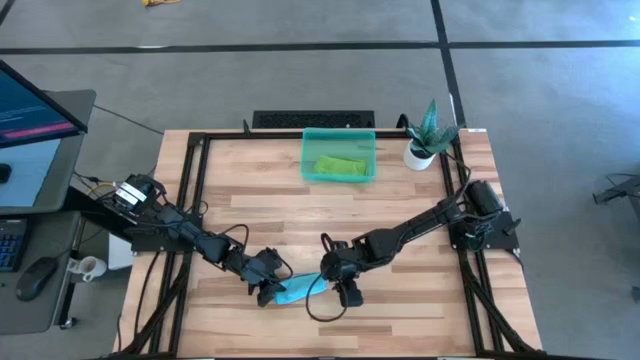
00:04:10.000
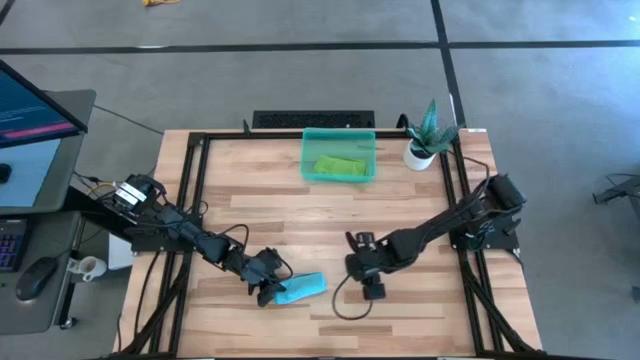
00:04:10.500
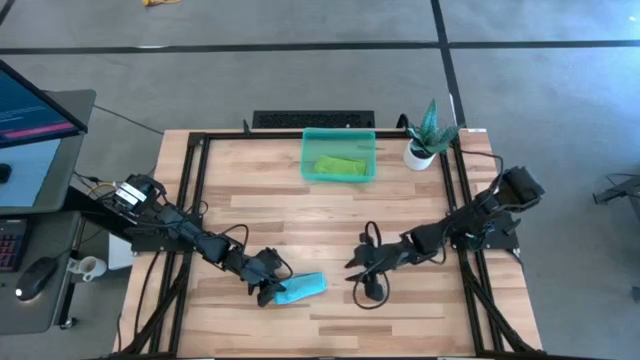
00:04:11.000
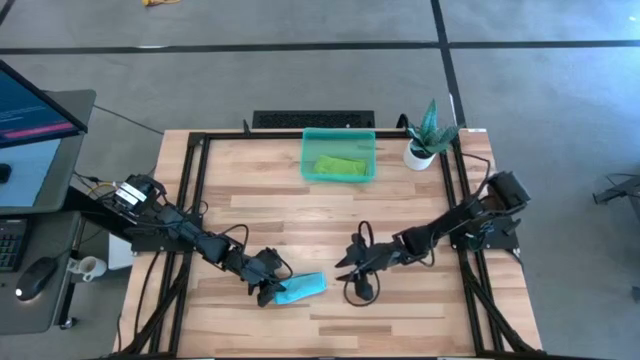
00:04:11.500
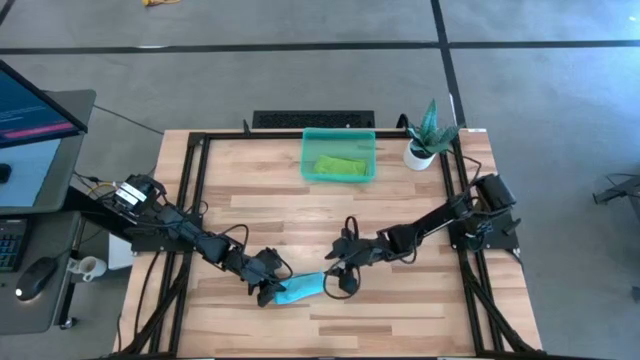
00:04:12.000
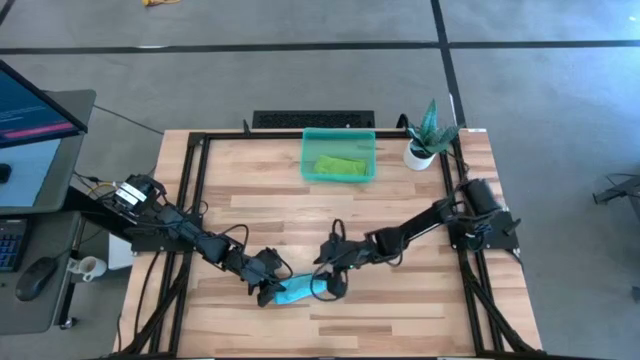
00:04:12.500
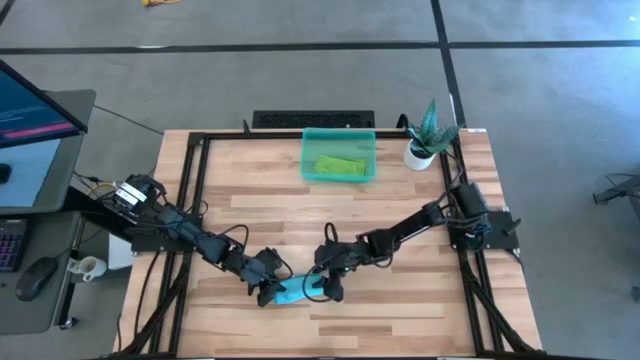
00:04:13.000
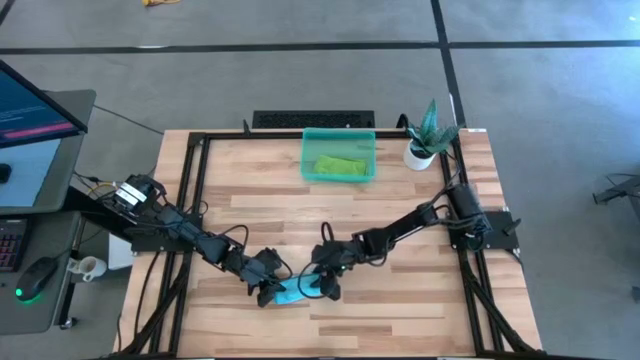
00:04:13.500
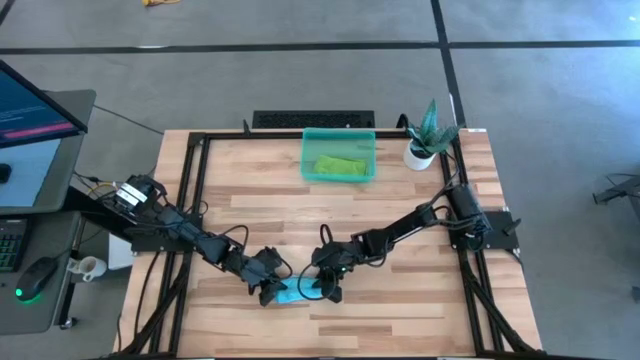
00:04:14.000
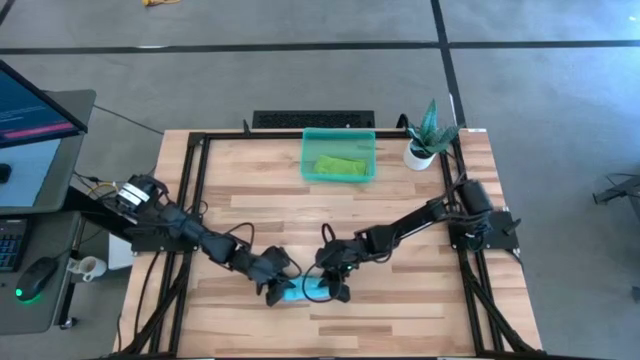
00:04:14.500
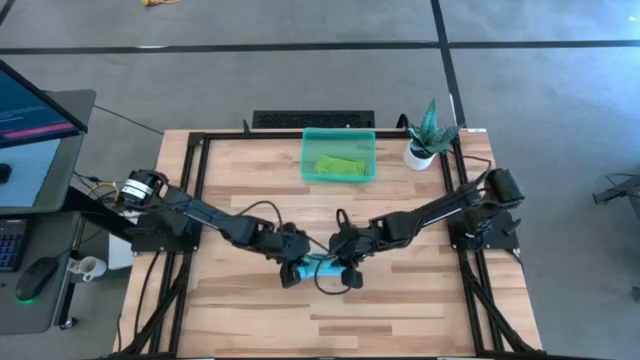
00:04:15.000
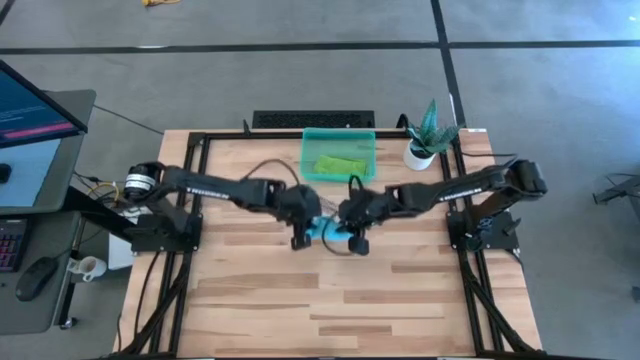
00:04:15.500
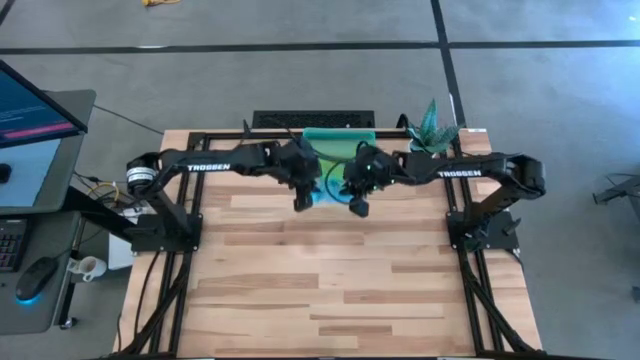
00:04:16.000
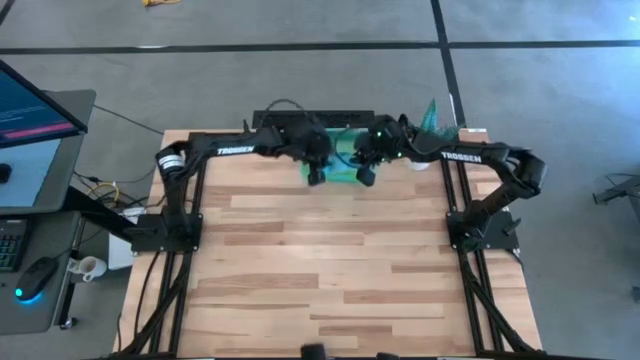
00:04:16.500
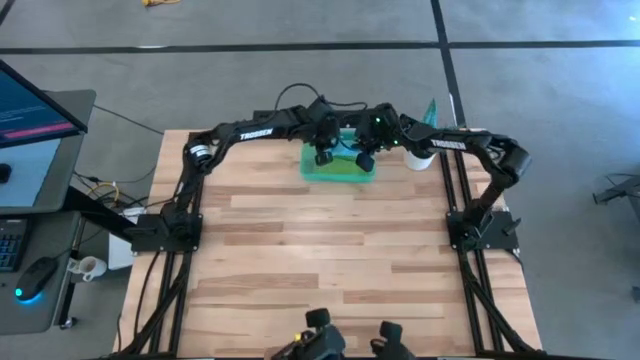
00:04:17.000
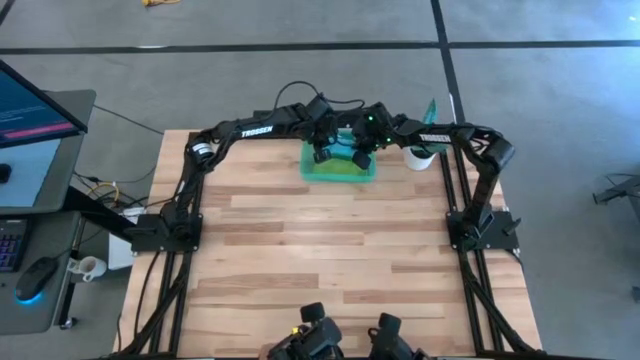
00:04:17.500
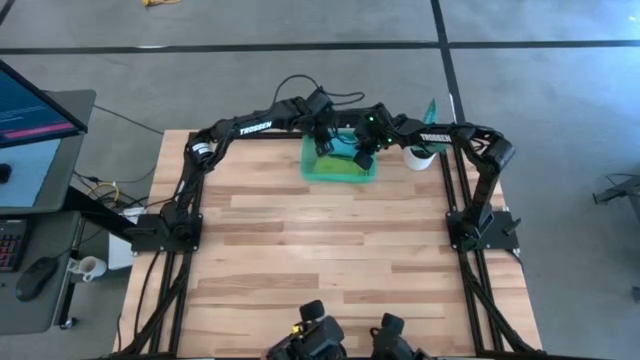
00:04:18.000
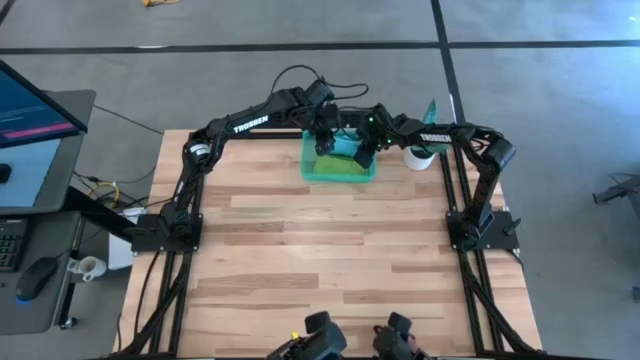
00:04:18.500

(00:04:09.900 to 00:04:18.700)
Task: Roll microfiber towels into tight, uniform cylinder then place into a basket
Put the rolled blue microfiber cloth into the green bin

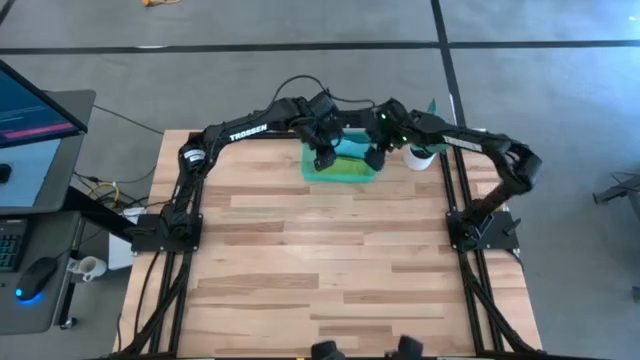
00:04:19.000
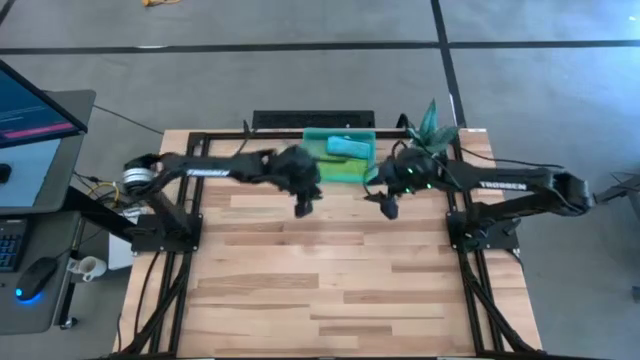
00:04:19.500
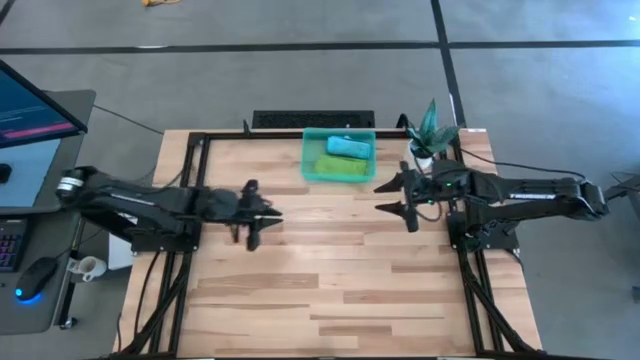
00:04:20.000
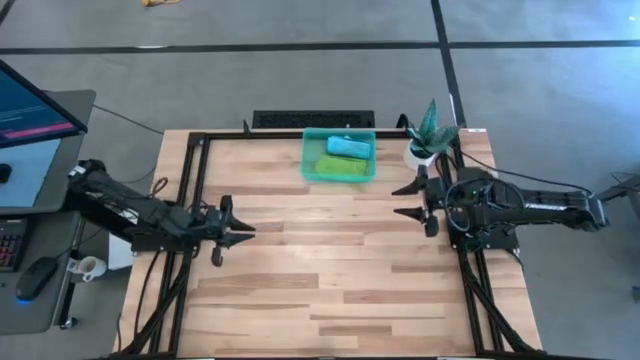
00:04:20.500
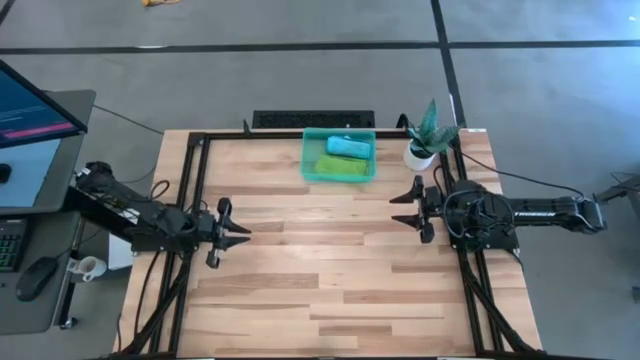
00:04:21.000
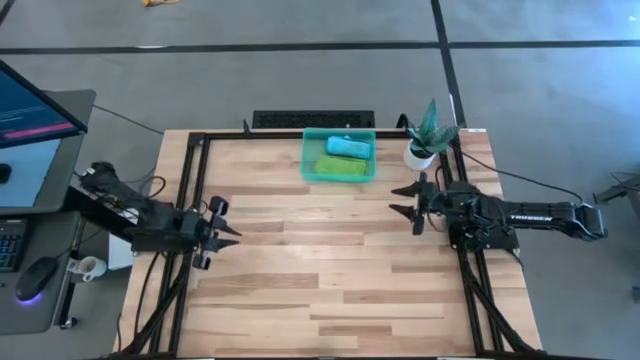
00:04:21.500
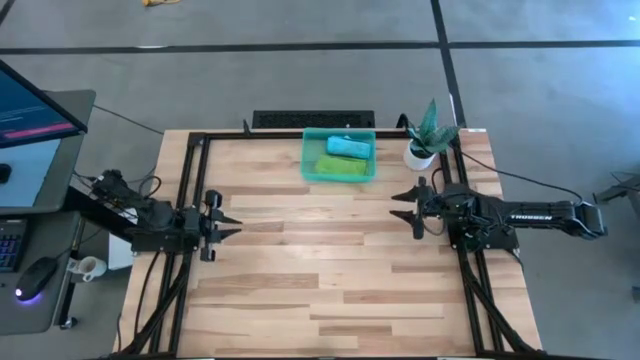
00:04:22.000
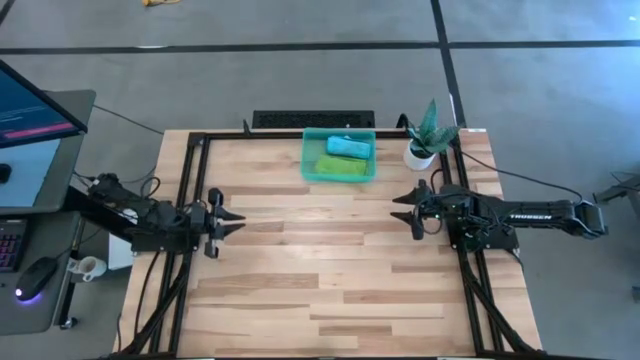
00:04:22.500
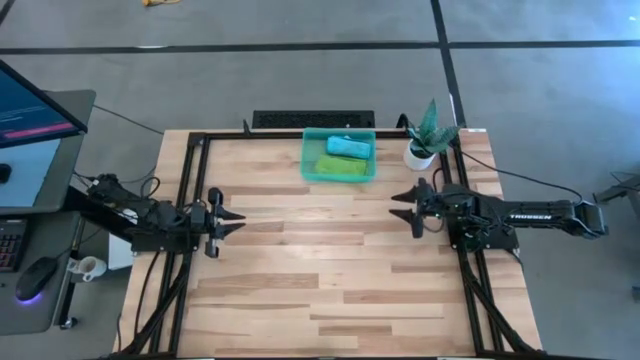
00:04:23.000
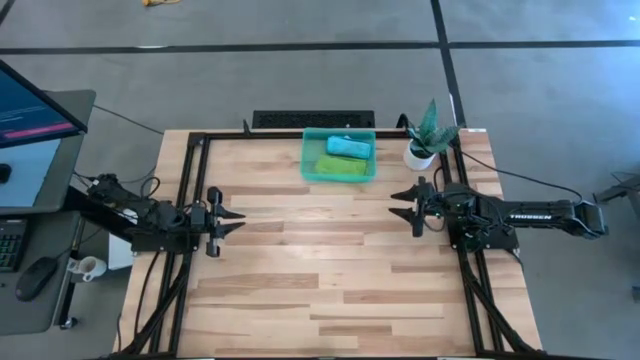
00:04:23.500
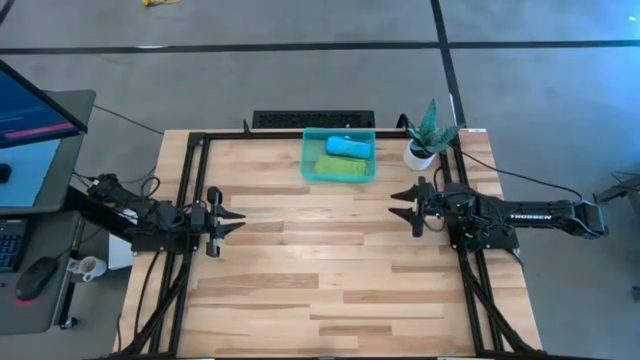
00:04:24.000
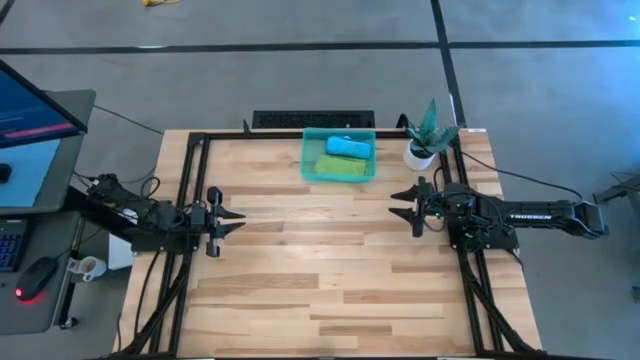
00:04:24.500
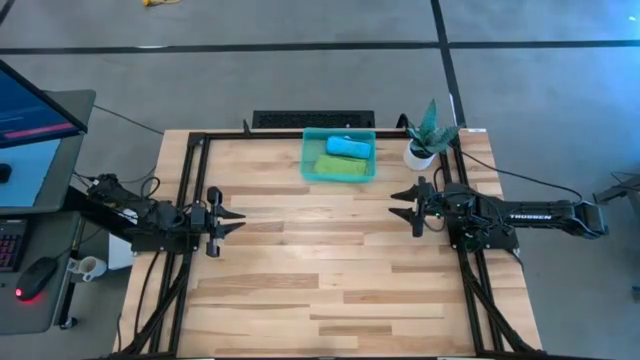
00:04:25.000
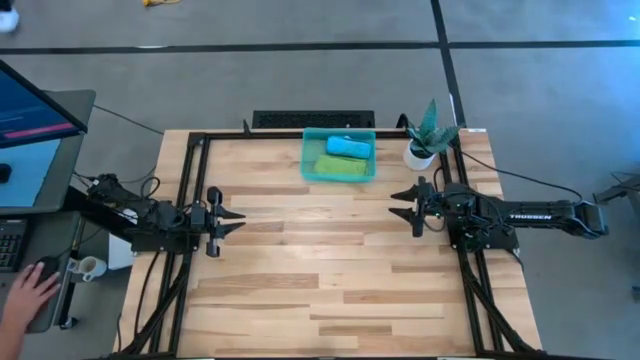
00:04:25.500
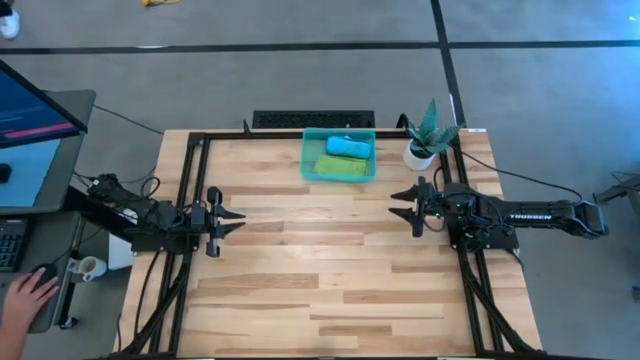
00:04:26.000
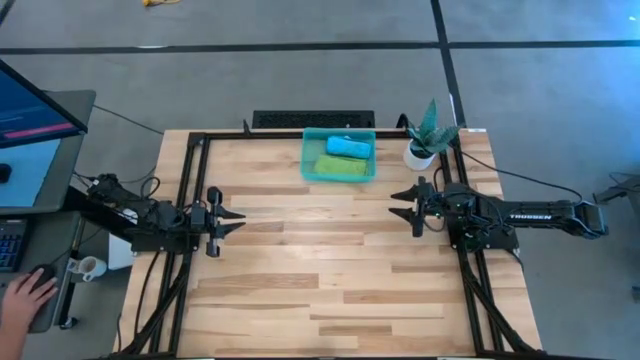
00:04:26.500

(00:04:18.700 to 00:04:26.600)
Return to Home Position

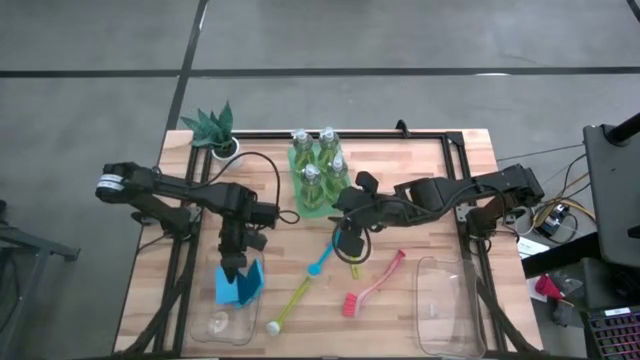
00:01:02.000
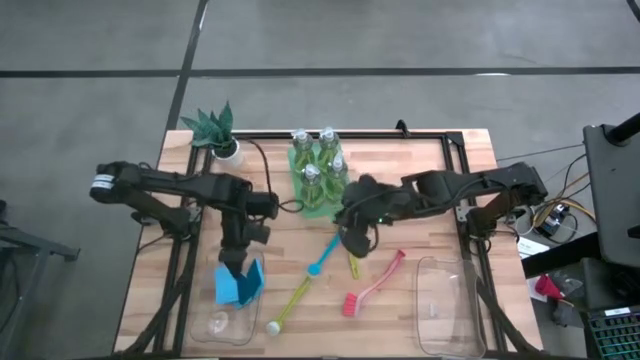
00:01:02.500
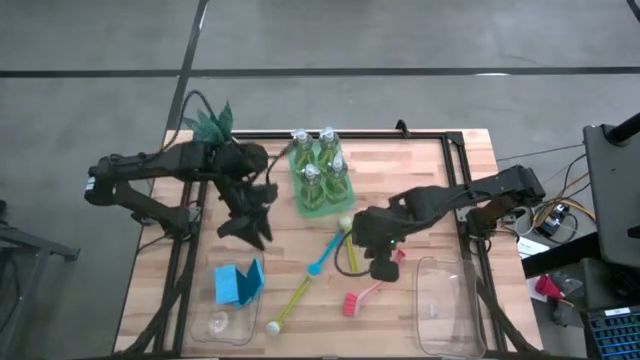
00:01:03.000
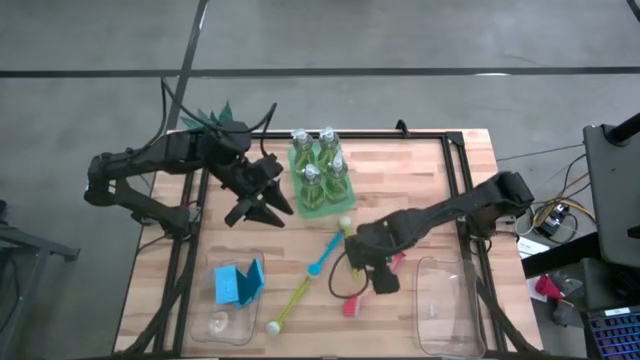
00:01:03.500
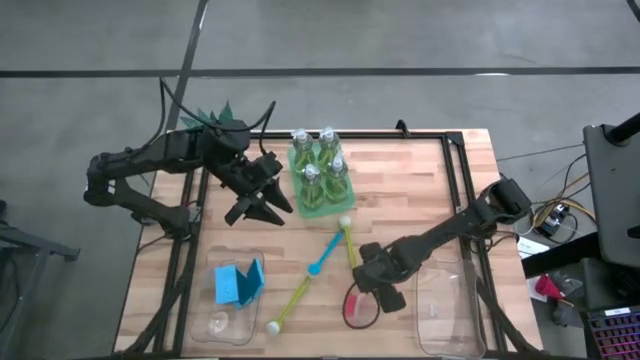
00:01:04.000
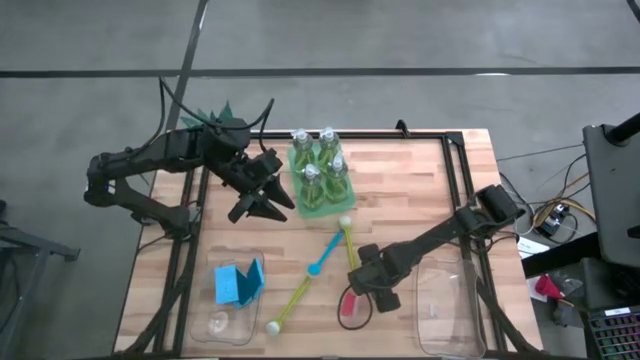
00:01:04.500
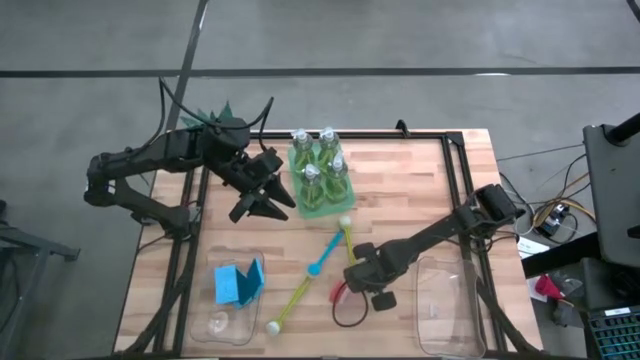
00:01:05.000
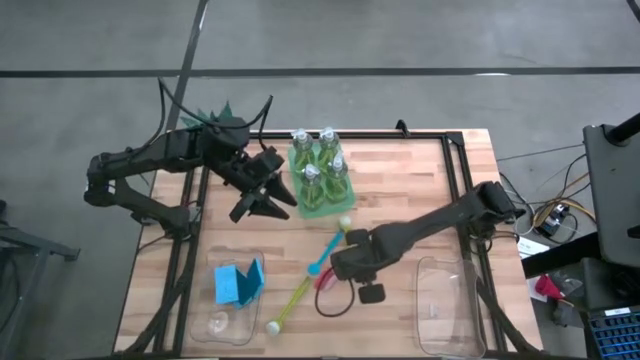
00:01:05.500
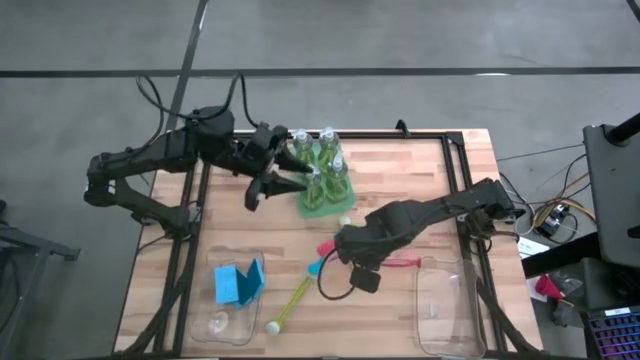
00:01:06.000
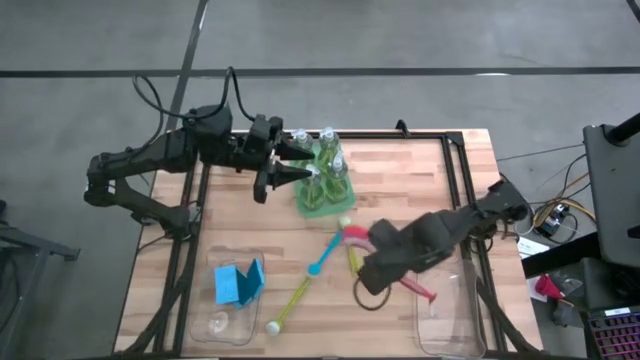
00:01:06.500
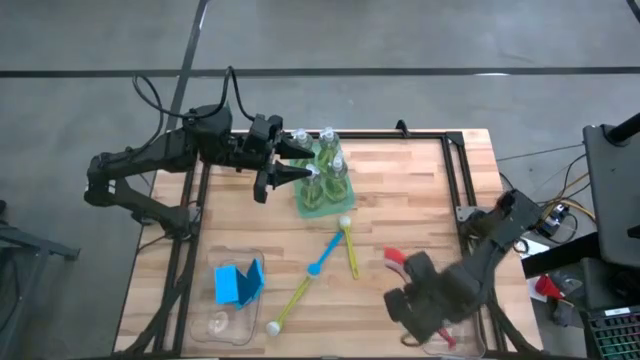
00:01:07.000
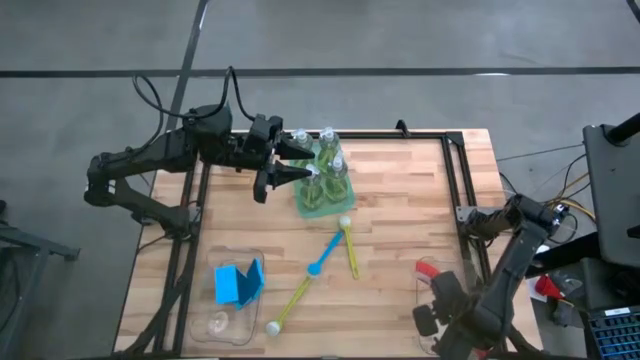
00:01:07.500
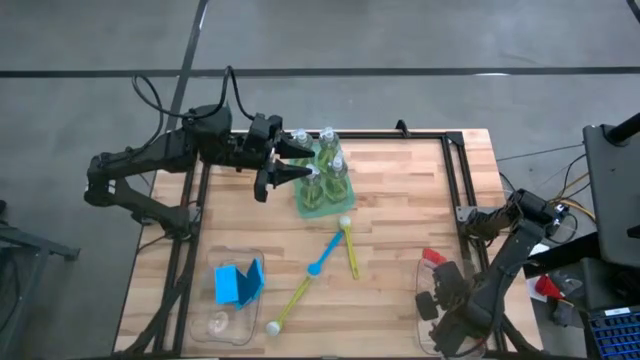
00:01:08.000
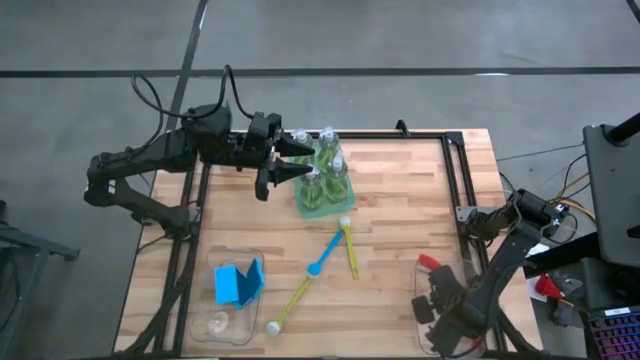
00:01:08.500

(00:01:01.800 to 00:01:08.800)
Task: Pick & Place Kitchen Sink Supplies
Put the red dish brush into the right transparent bin
